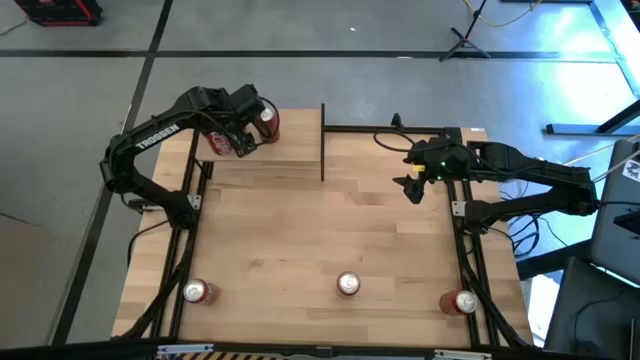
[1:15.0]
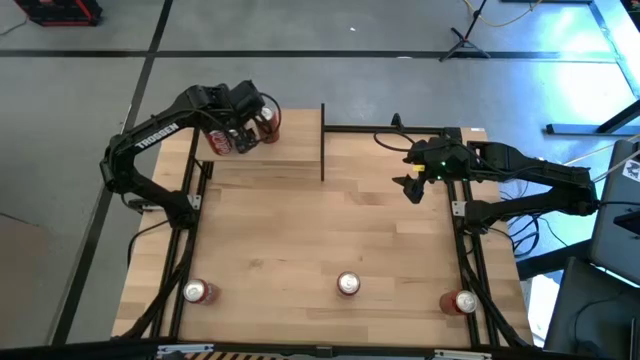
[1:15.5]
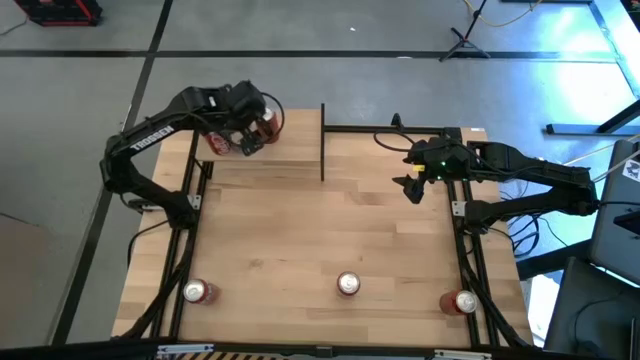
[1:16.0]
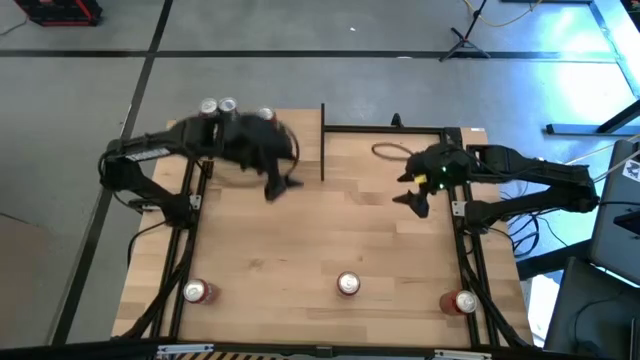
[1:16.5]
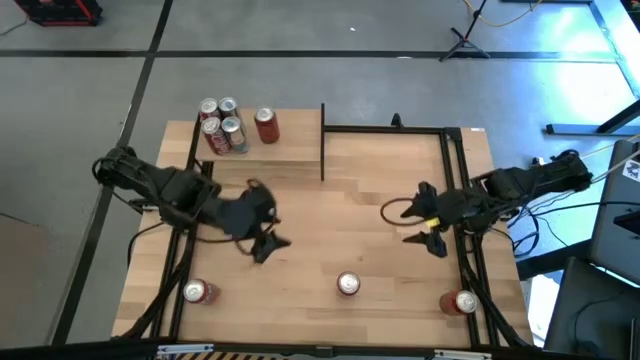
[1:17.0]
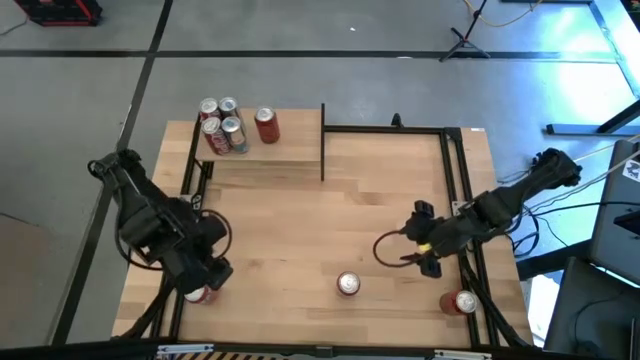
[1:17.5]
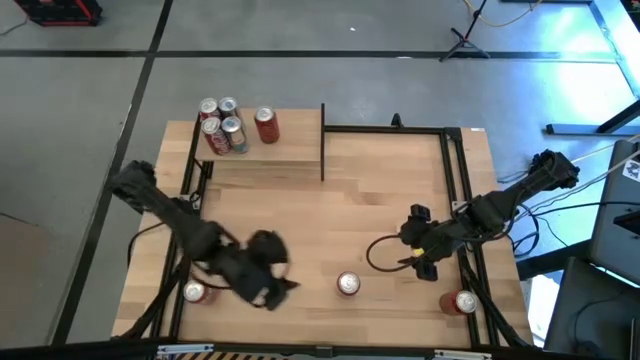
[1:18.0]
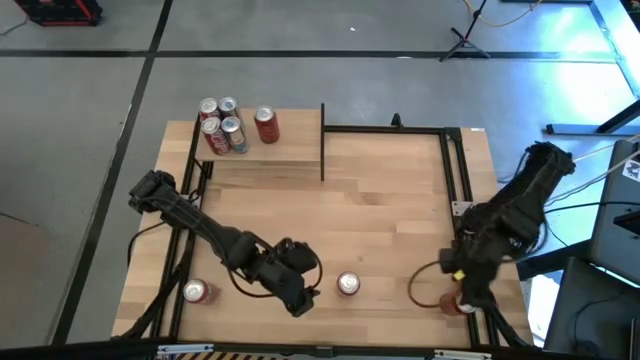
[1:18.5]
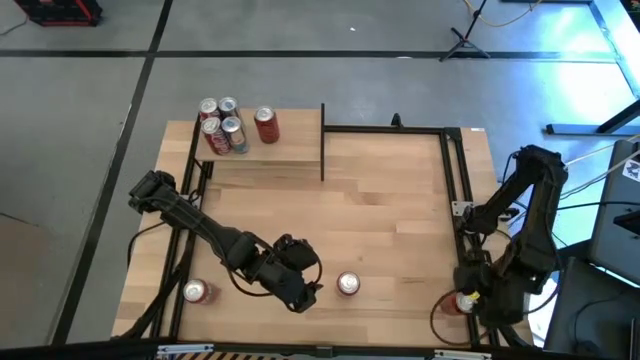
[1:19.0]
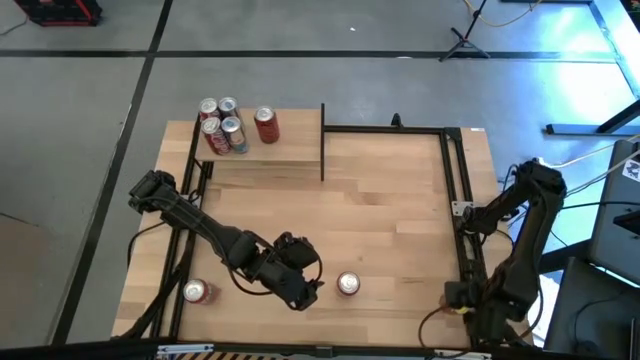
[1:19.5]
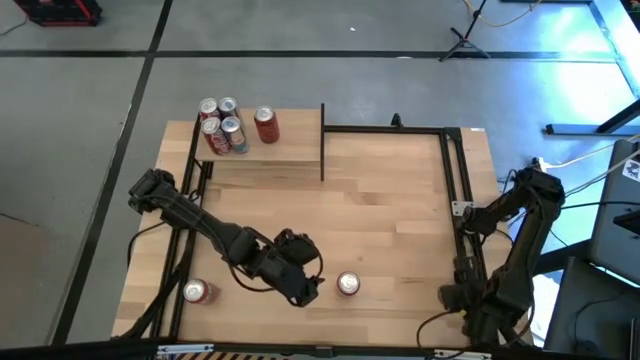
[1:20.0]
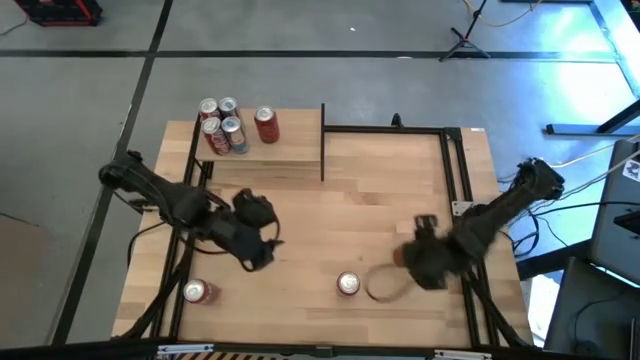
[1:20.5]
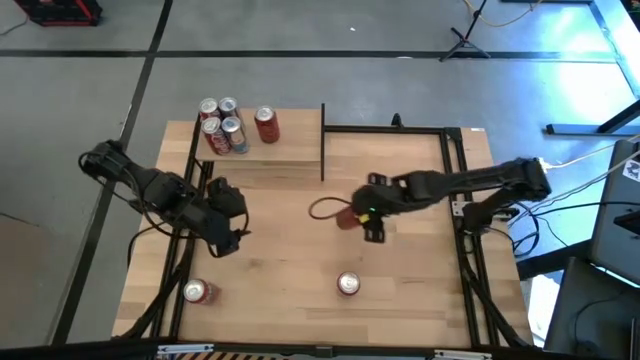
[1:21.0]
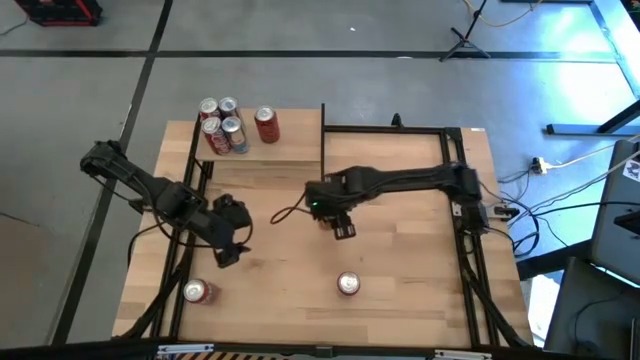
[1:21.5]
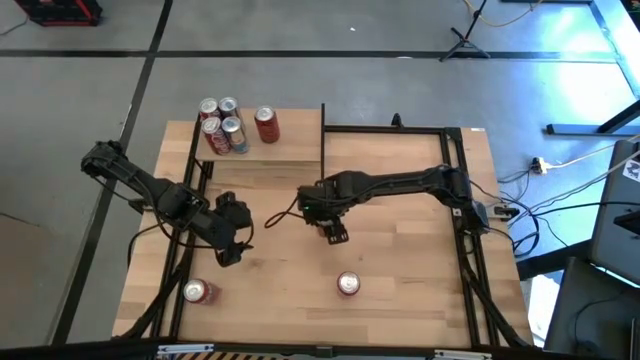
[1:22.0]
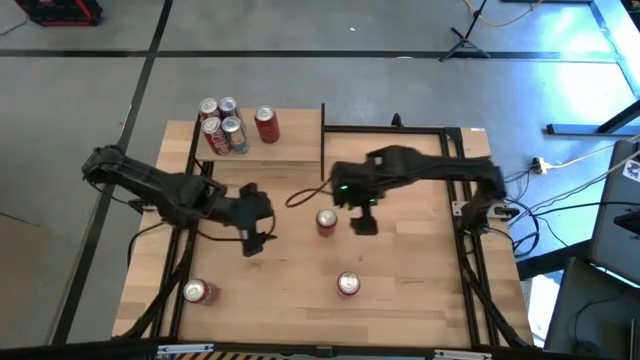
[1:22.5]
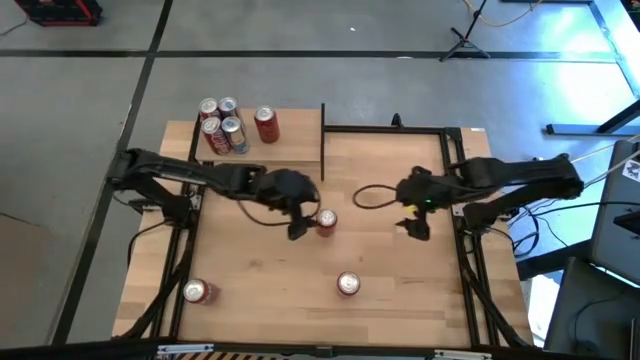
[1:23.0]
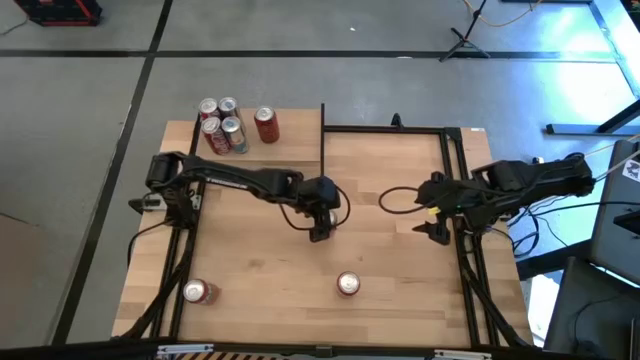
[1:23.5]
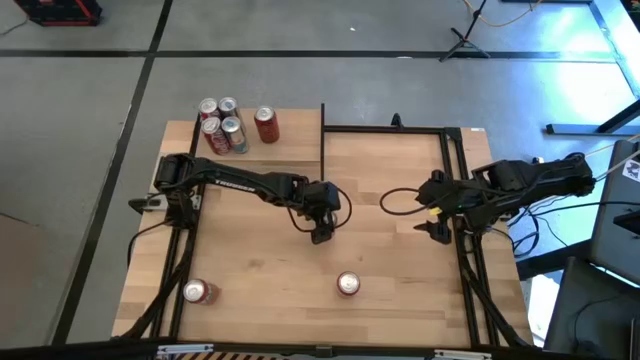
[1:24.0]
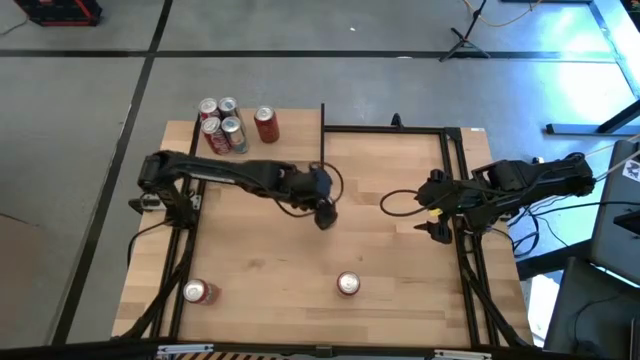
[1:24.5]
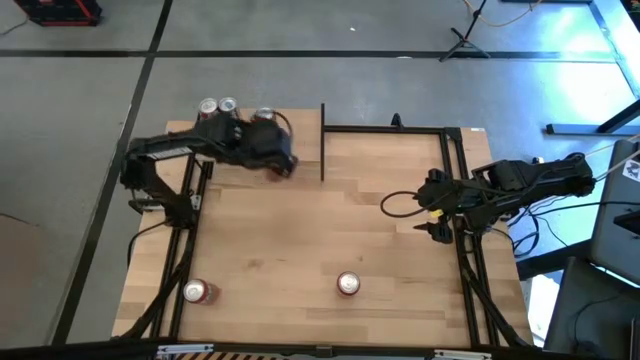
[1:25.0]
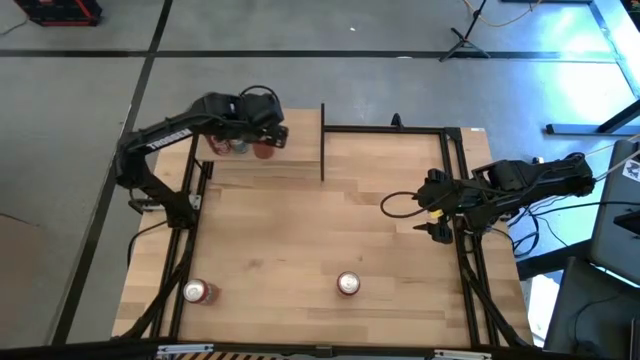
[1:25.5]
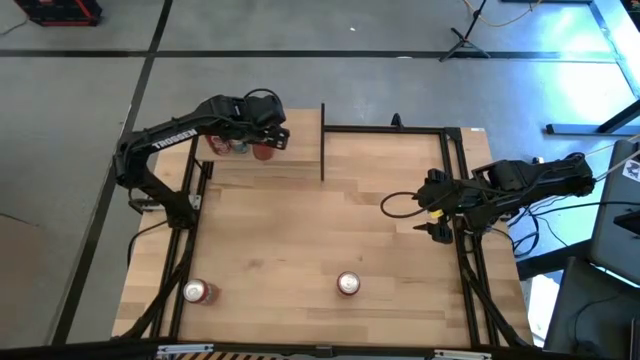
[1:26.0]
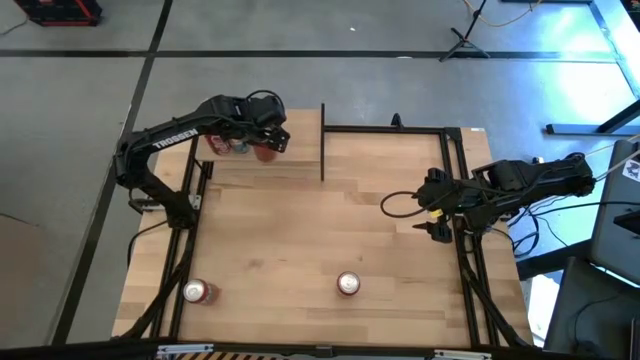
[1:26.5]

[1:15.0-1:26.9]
Task: Place canned beverage on shelf
Put the red and black soda can on the shelf aligned with the other red and black soda can

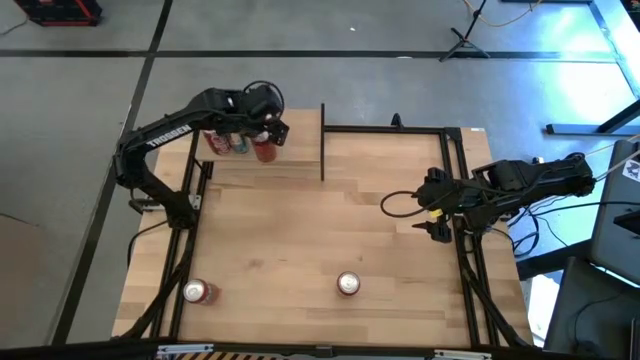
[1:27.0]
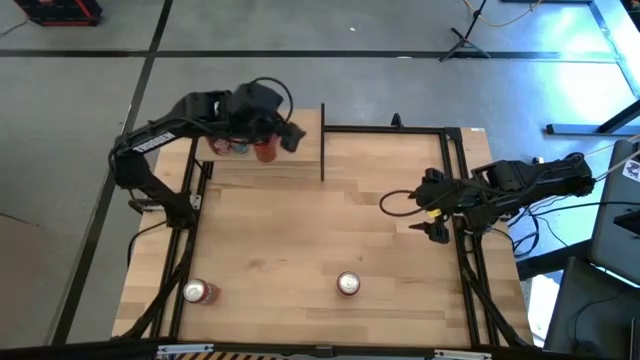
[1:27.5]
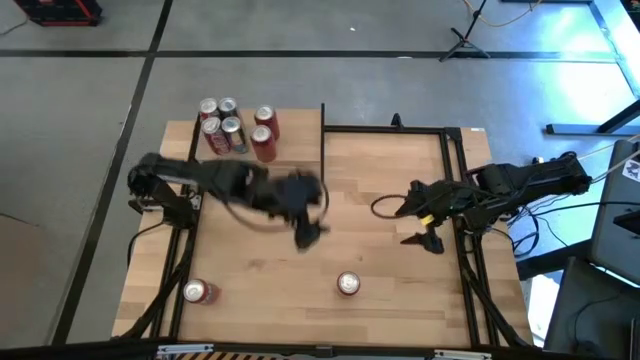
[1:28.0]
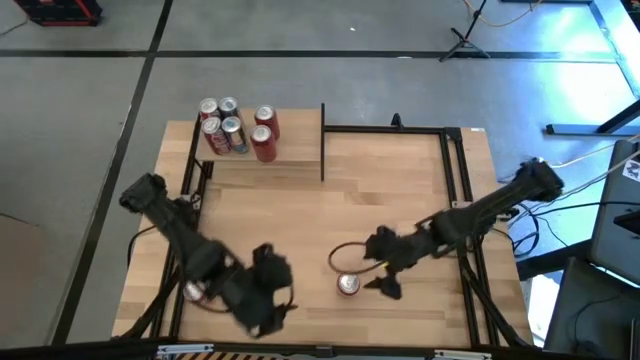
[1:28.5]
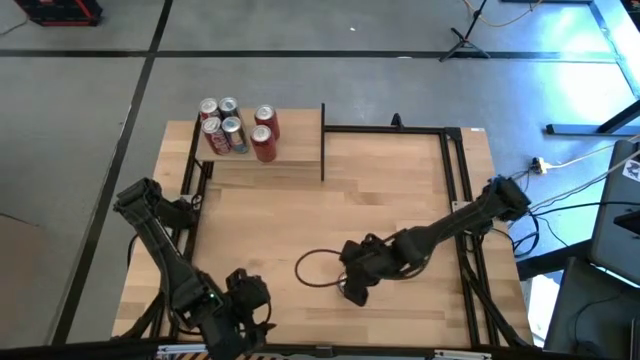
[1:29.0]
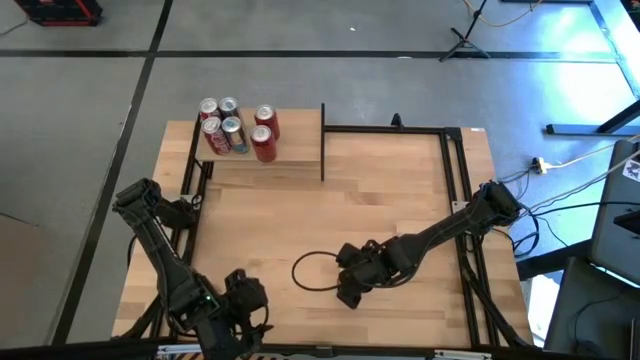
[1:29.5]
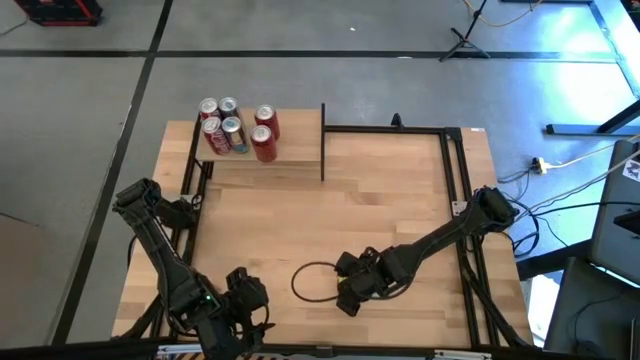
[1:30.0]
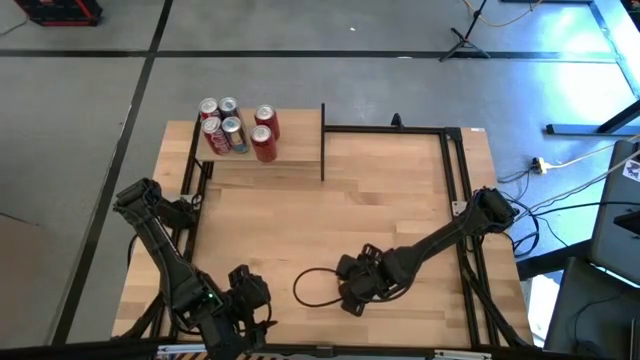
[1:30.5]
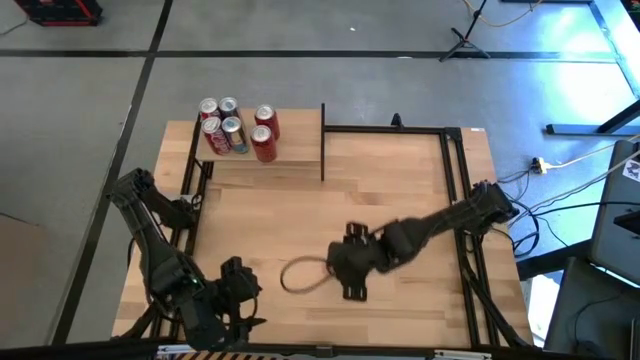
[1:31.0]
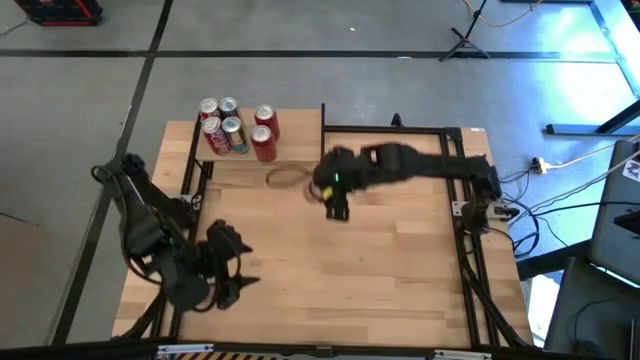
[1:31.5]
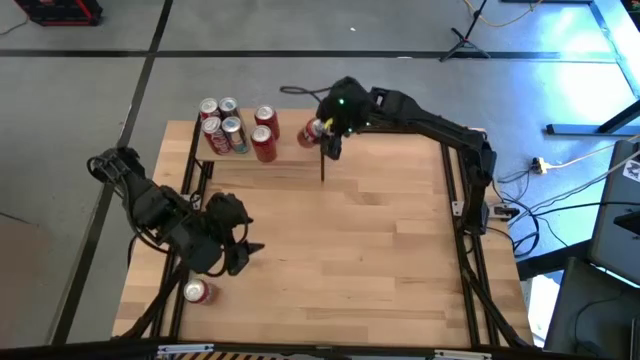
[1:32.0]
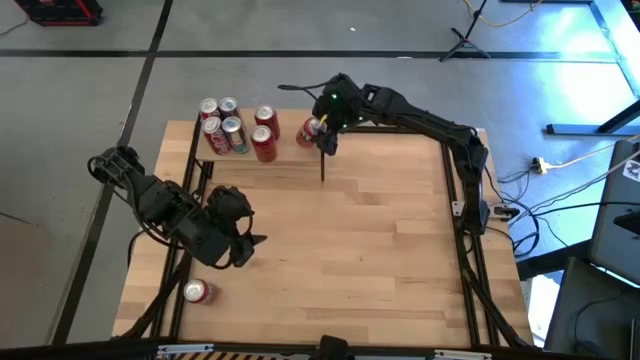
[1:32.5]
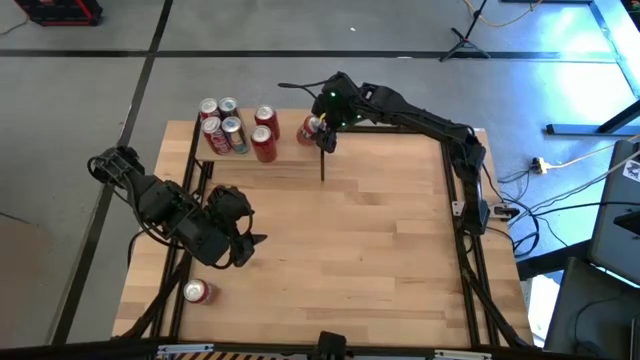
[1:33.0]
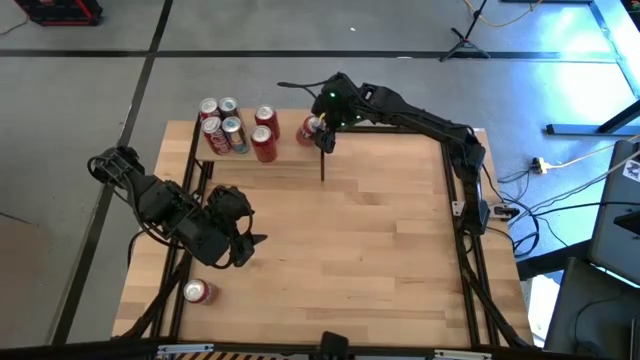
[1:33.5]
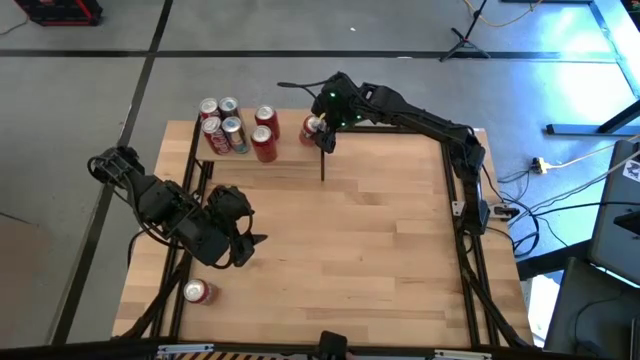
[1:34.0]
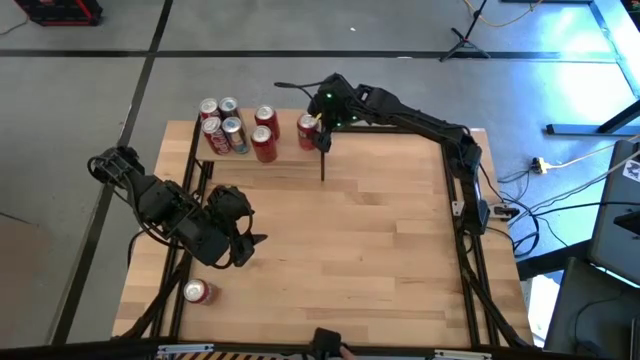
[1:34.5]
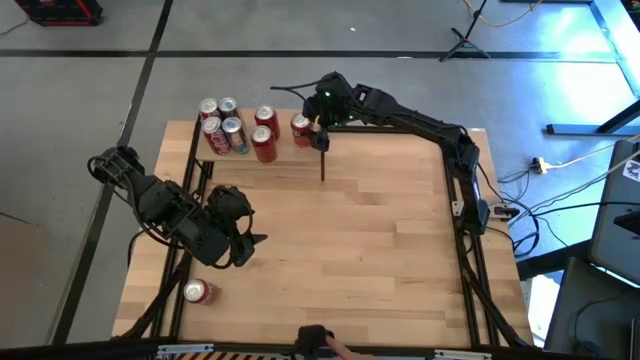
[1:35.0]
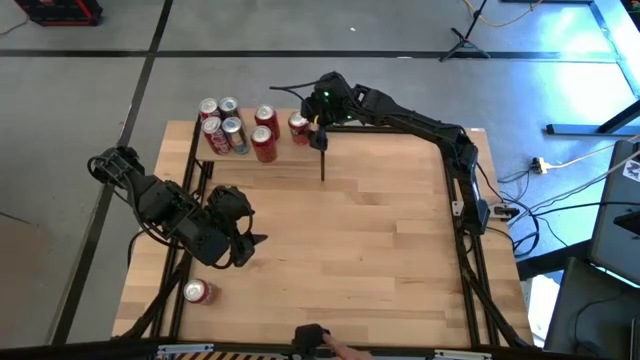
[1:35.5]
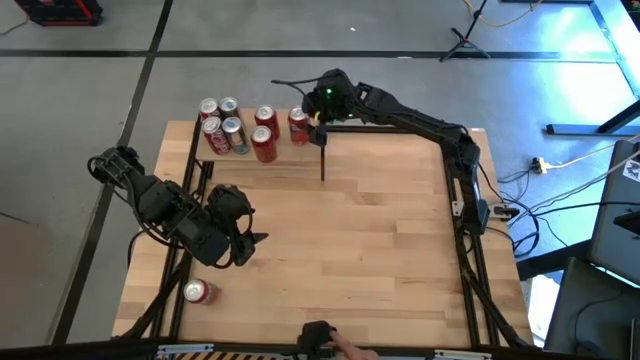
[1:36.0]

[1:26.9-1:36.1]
Put the right orange soda can on the shelf

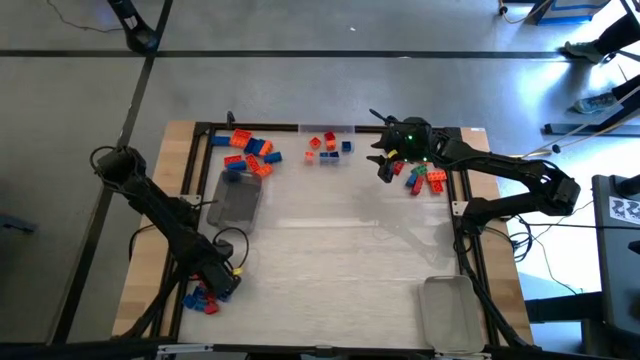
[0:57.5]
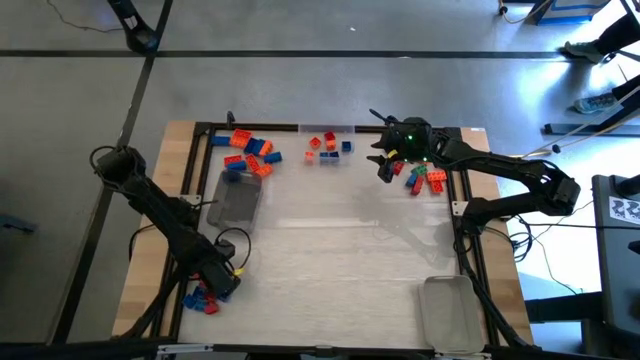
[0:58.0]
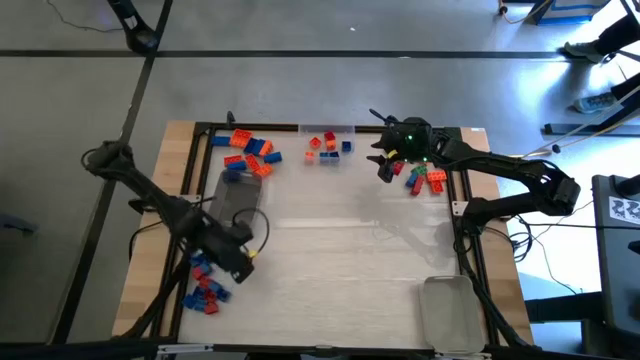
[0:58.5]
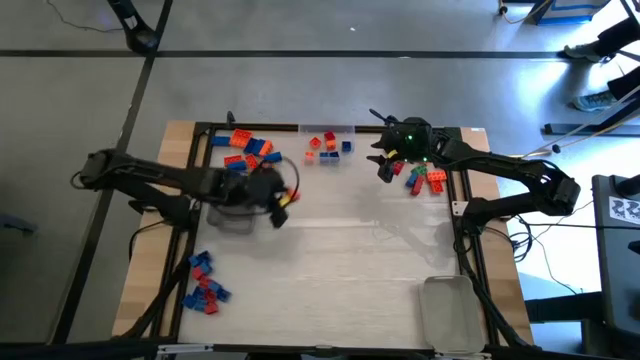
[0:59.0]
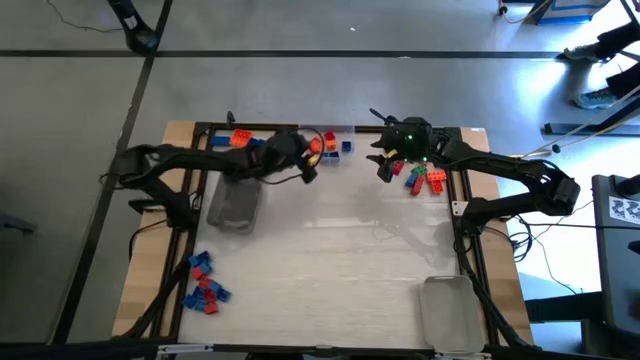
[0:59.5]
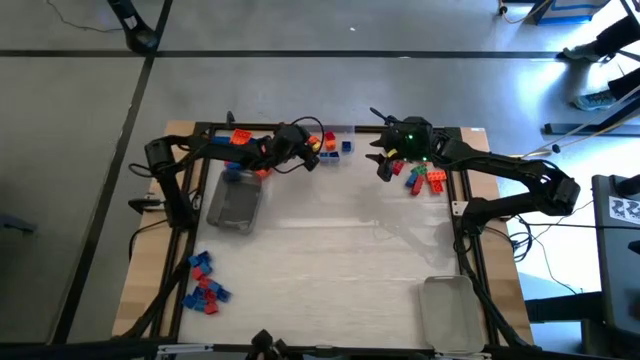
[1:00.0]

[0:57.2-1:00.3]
Task: Sort blocks by size
Put the orange 4 stud game piece into the transparent bin
